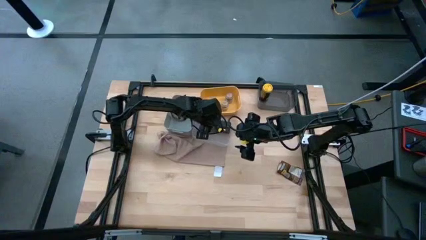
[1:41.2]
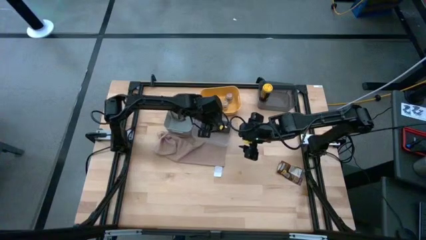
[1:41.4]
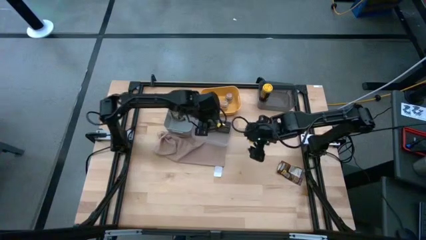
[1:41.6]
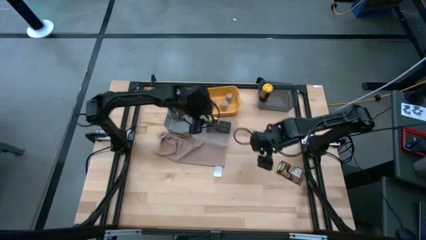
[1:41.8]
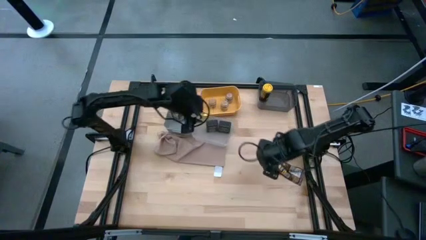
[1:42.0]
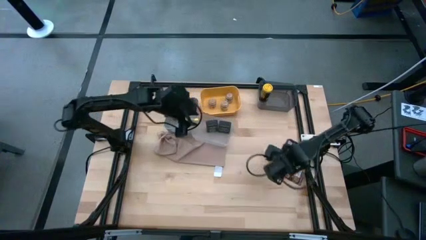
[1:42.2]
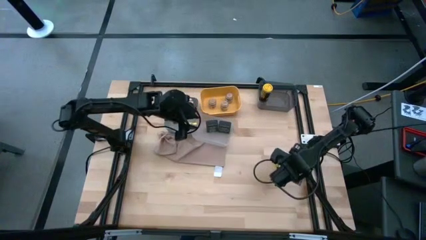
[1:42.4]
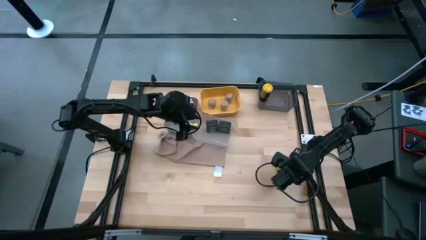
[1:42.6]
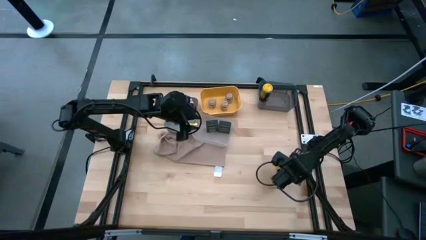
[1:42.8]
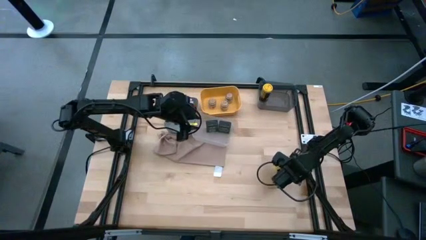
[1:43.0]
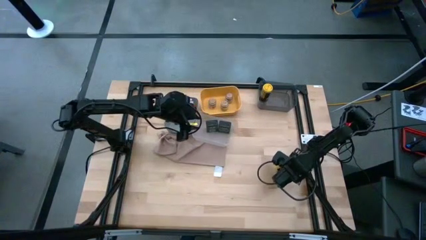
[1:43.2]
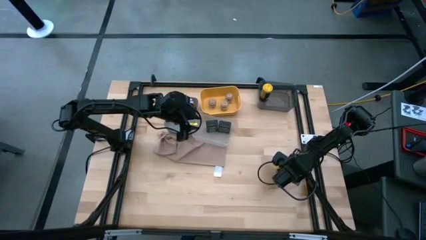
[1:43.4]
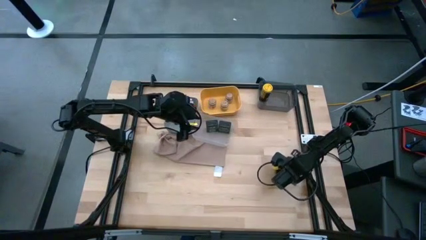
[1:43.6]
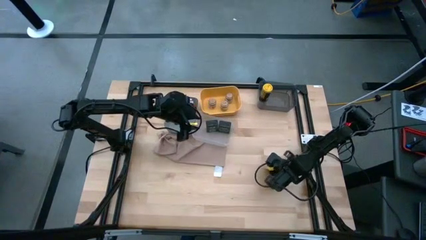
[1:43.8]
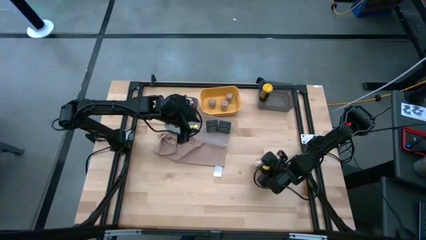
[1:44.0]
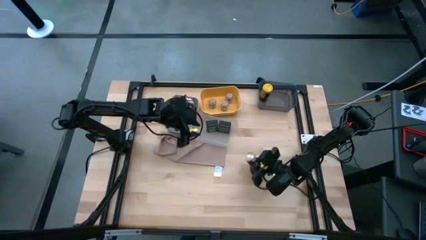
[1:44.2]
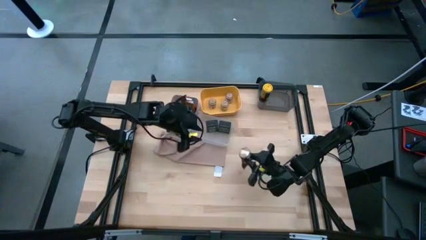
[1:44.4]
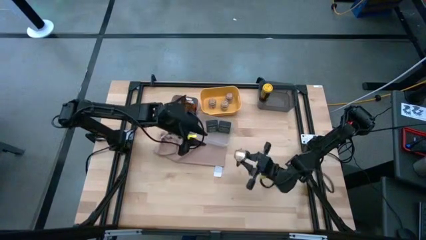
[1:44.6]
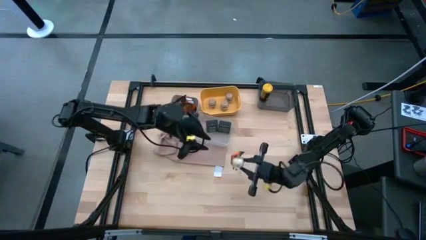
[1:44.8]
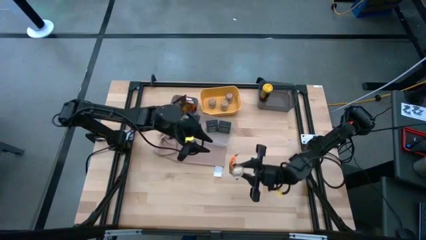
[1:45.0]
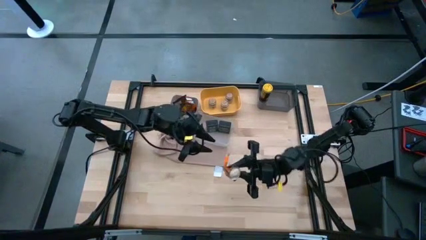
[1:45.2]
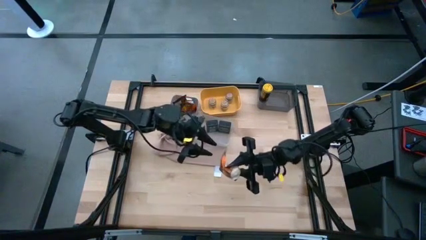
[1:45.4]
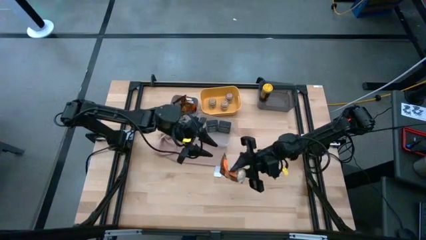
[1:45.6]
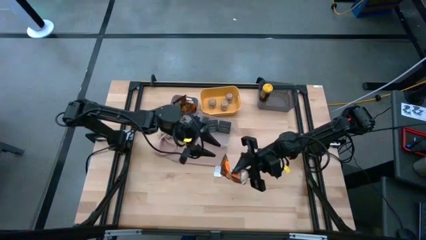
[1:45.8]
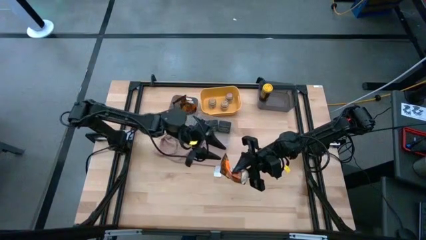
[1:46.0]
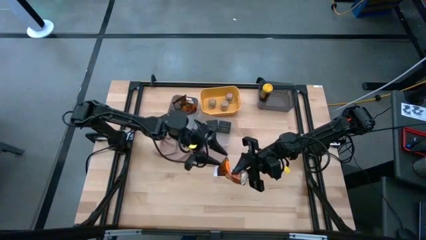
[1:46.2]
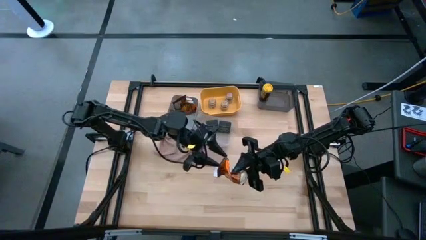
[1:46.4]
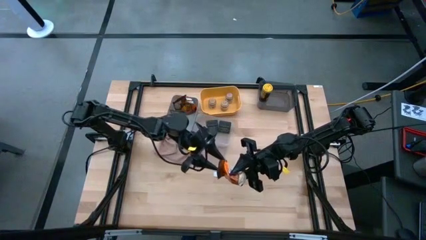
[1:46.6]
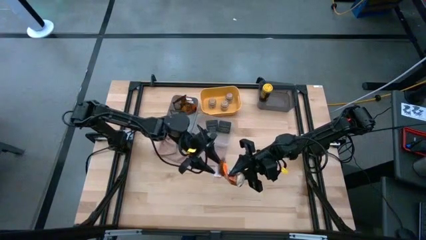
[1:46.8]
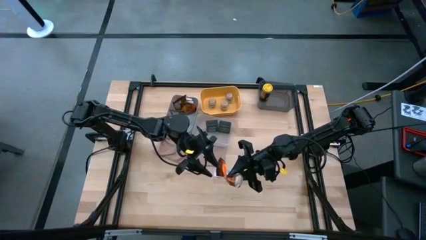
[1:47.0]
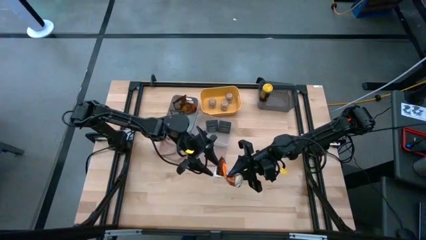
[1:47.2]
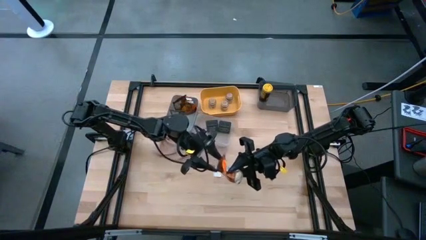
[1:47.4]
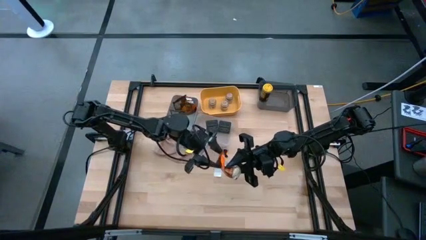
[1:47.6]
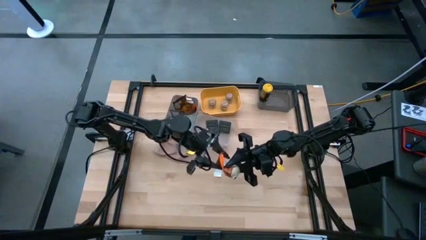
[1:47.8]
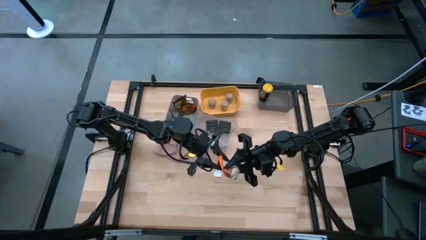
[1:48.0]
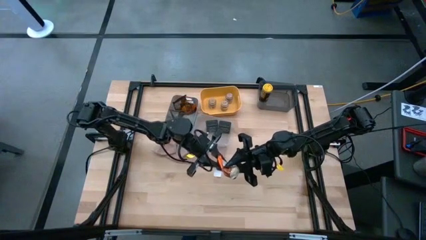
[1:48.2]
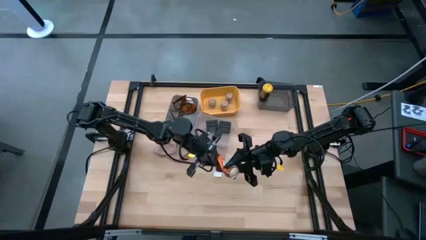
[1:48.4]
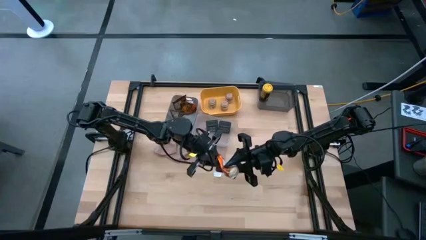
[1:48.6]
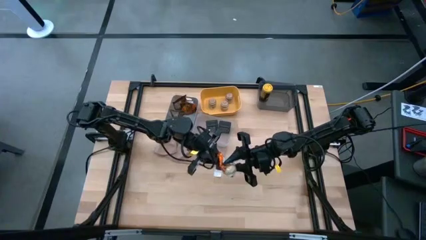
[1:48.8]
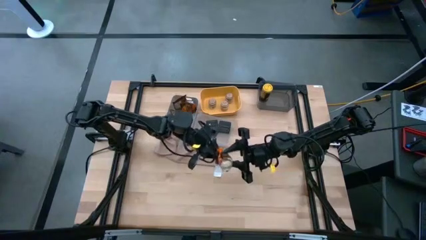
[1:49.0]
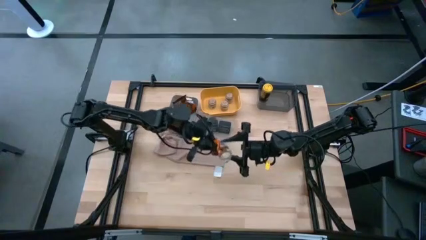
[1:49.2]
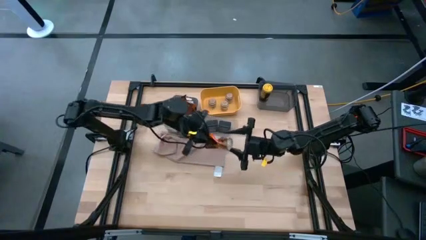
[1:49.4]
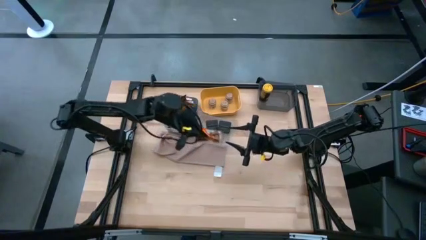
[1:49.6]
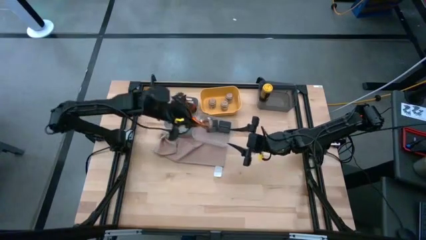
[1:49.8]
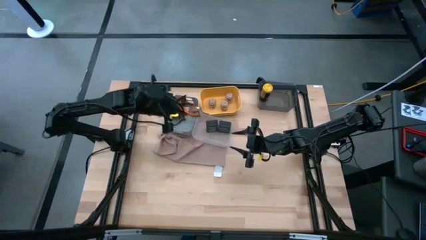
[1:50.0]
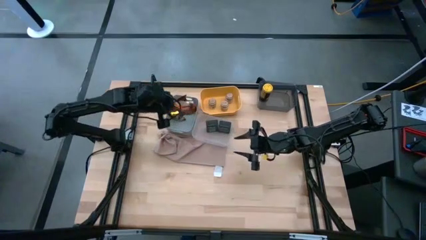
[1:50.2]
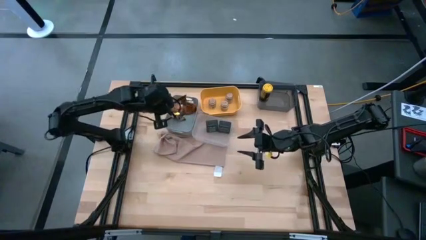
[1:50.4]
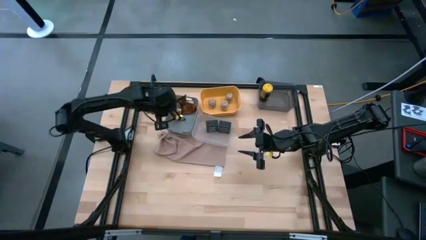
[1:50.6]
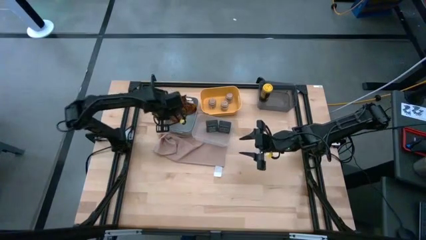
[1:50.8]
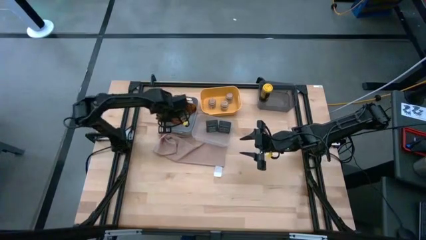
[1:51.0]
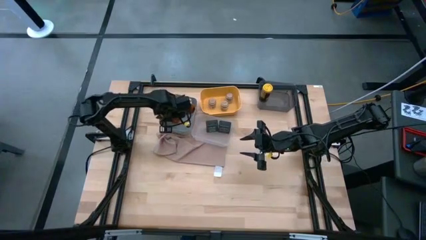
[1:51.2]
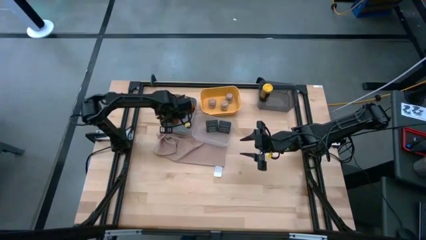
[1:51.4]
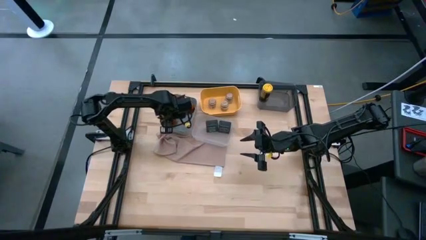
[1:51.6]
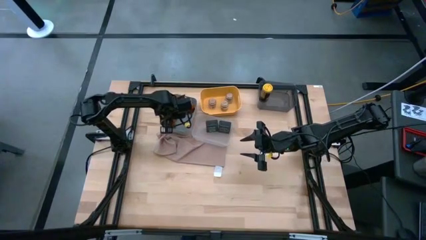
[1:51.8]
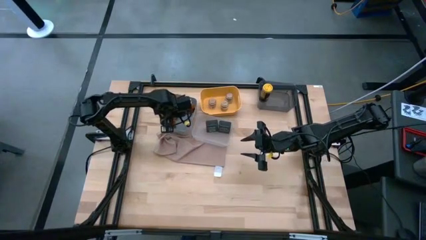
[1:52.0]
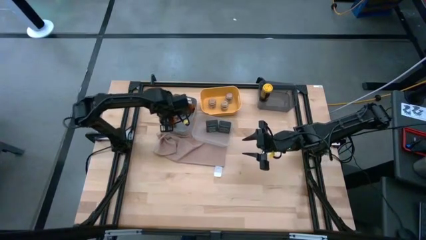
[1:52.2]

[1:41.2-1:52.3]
Task: Sort spices by type
Put the orange seasoning pack into the gray bin

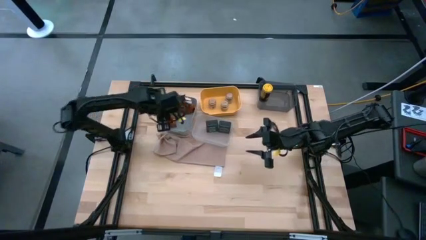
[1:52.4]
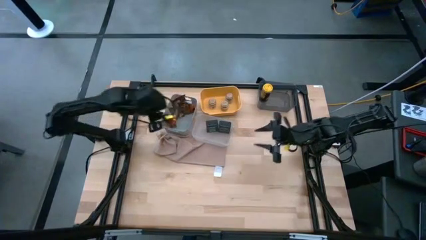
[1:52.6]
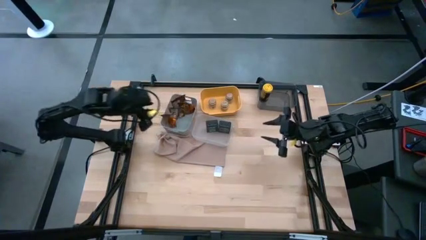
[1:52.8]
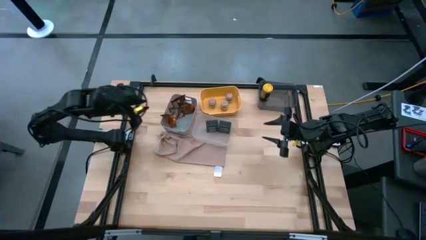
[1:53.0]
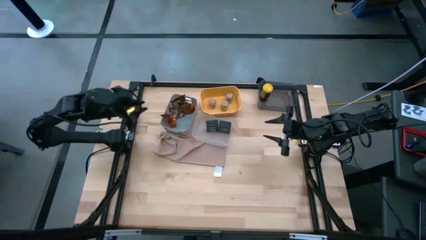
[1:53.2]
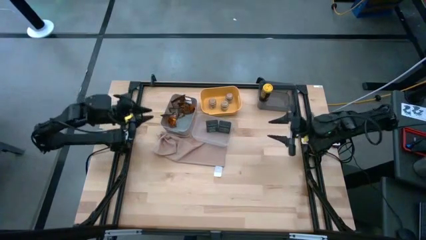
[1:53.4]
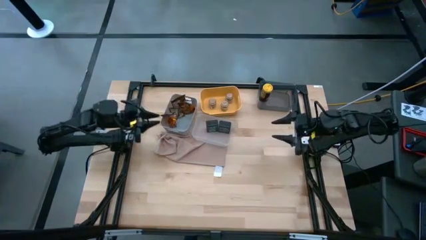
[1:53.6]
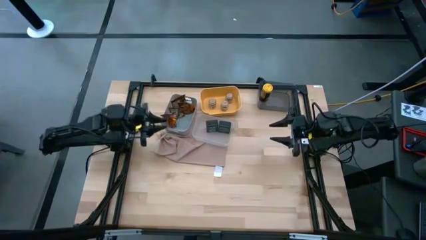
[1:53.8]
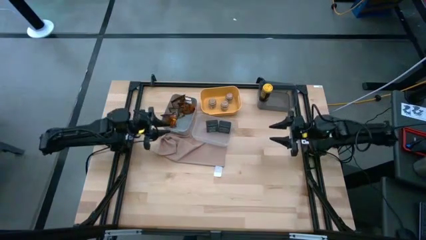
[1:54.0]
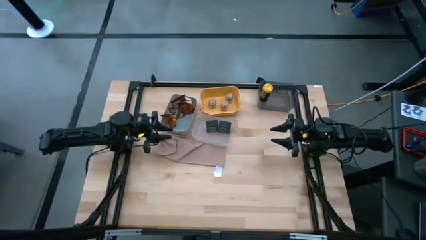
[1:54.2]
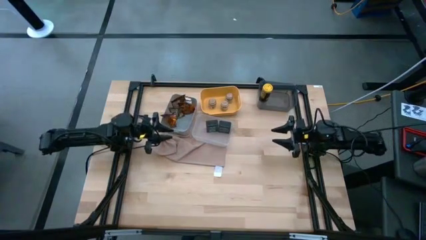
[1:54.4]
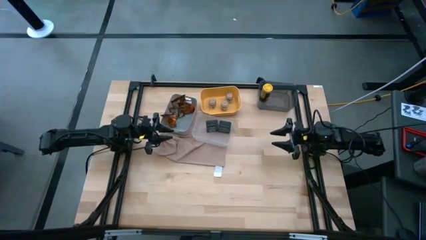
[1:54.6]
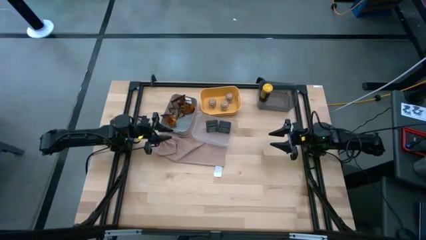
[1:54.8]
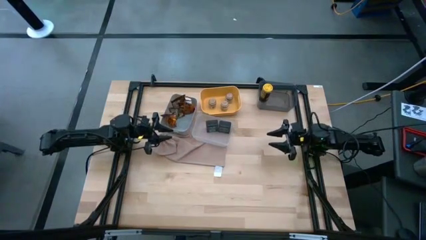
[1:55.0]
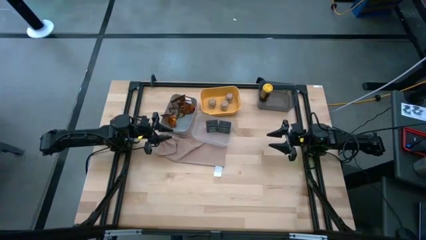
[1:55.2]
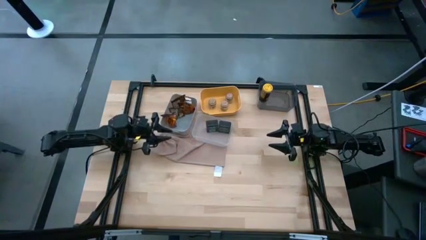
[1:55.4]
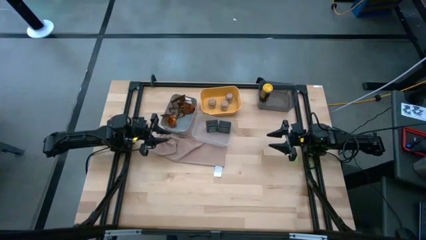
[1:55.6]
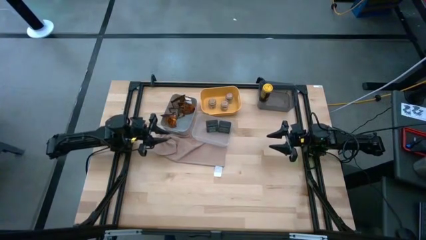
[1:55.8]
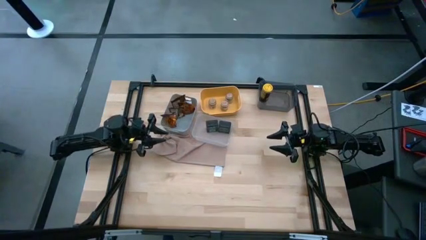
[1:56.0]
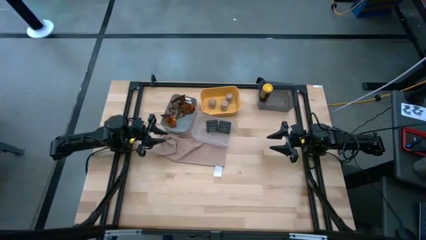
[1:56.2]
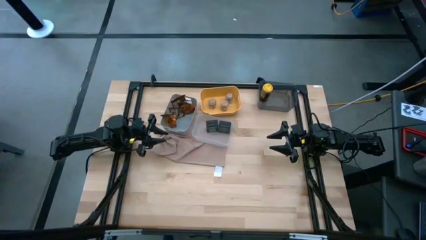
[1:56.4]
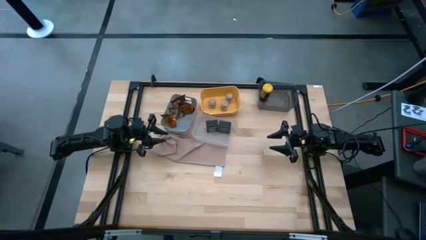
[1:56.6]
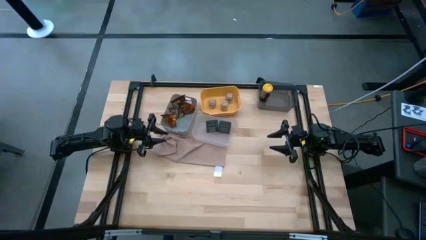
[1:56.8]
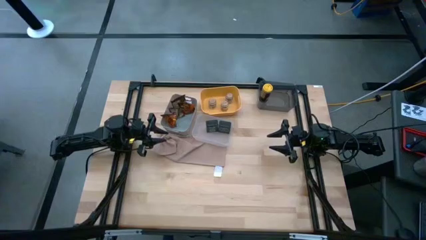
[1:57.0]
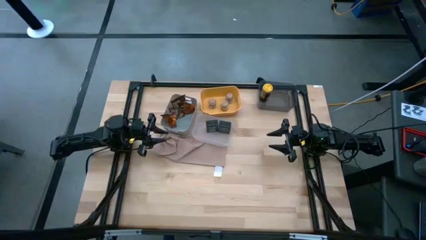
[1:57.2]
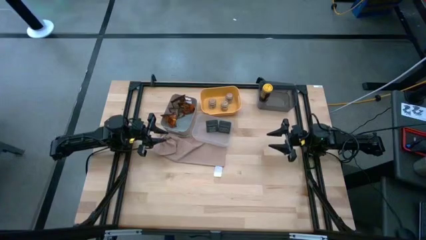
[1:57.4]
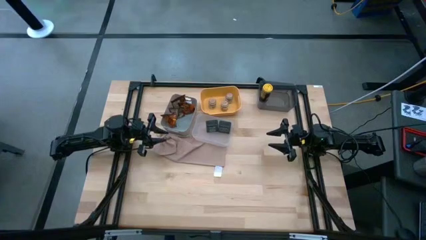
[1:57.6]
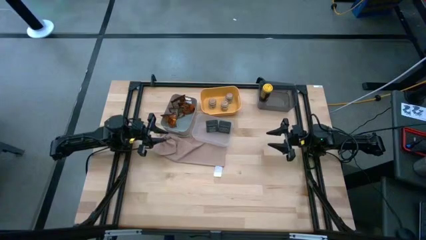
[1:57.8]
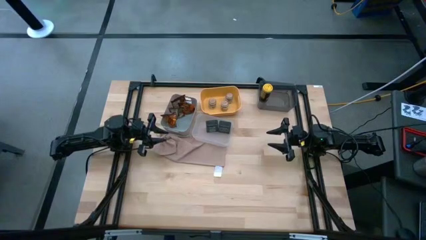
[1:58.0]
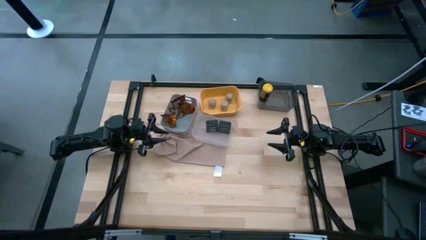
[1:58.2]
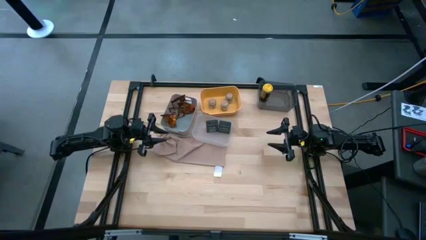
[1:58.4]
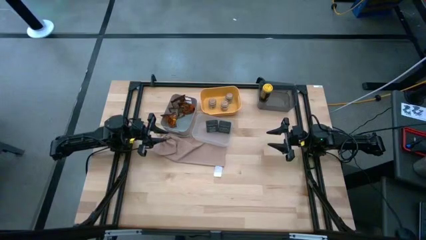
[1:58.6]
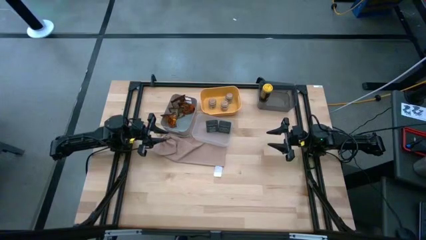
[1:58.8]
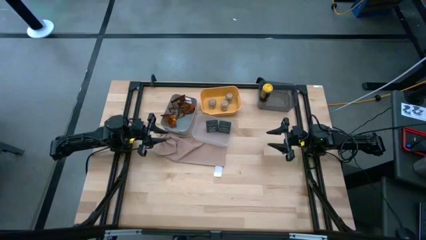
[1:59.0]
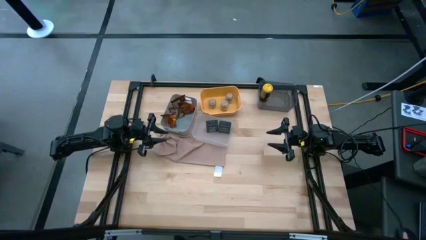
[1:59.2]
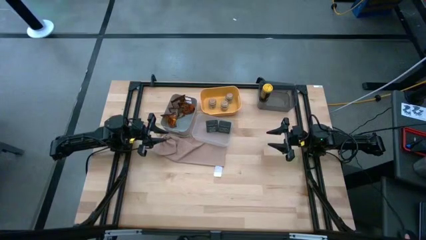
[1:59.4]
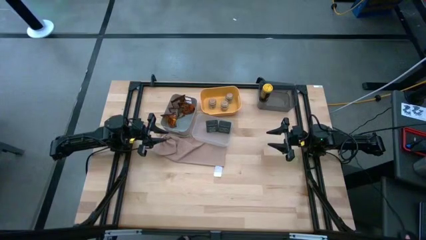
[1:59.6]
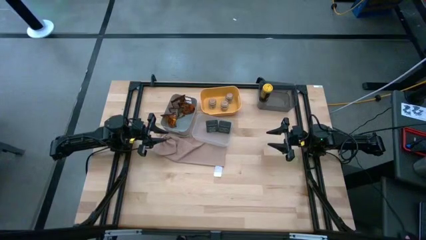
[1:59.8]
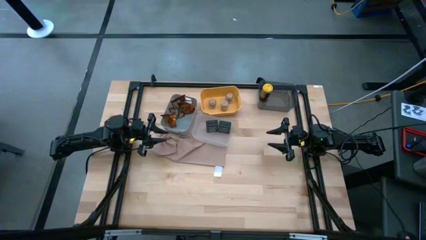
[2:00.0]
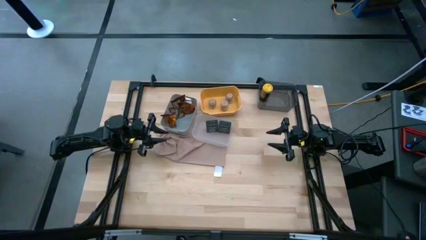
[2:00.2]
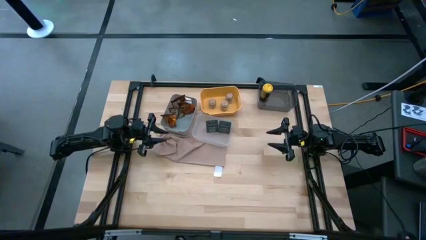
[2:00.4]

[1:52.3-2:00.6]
Return to Home Position
